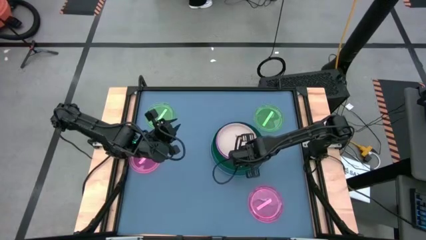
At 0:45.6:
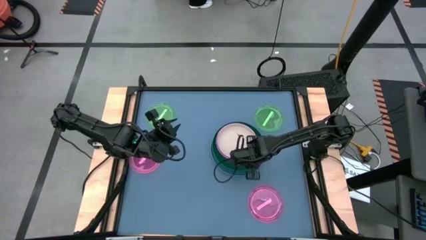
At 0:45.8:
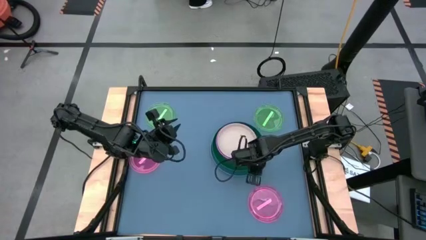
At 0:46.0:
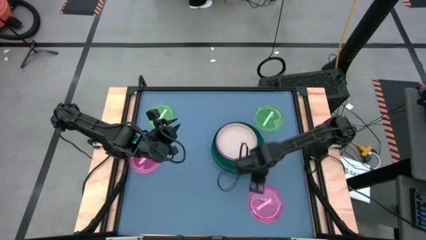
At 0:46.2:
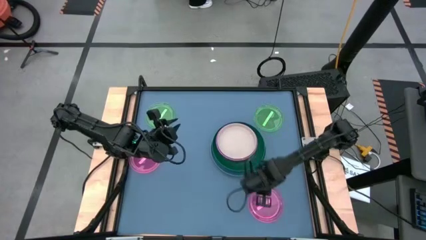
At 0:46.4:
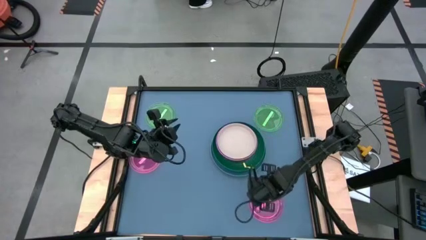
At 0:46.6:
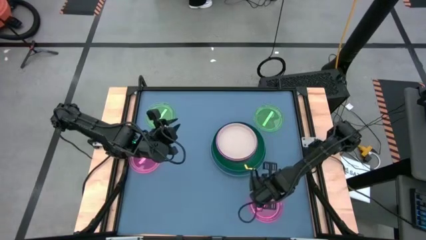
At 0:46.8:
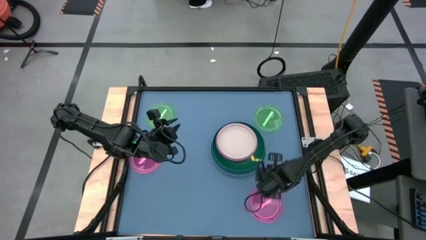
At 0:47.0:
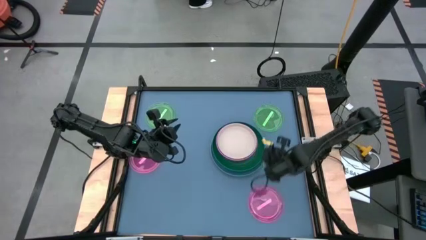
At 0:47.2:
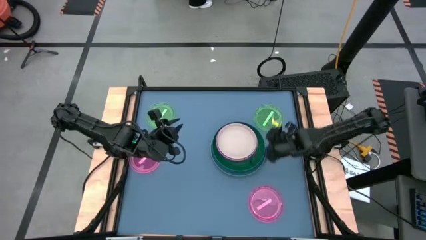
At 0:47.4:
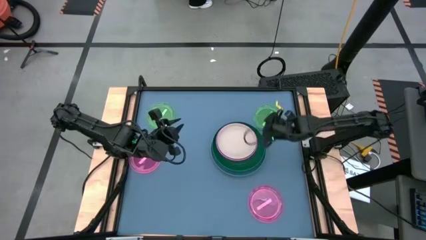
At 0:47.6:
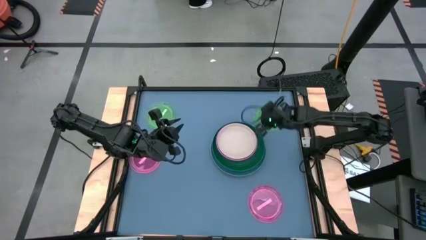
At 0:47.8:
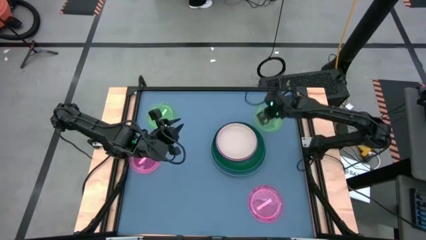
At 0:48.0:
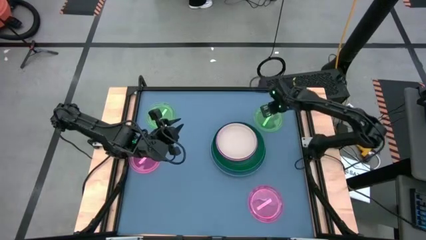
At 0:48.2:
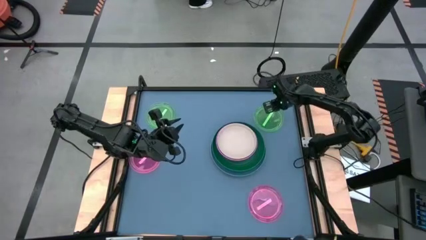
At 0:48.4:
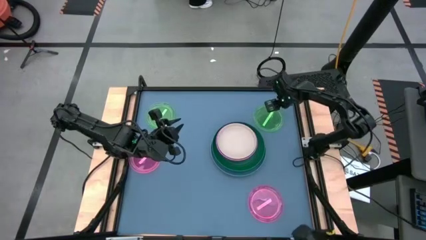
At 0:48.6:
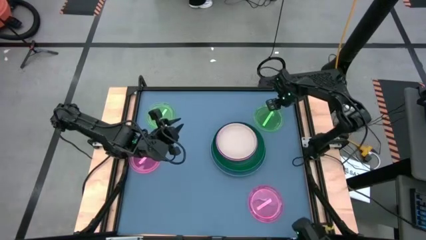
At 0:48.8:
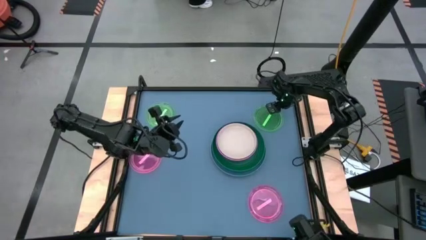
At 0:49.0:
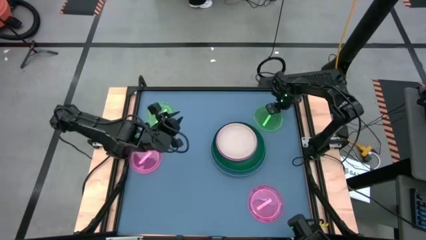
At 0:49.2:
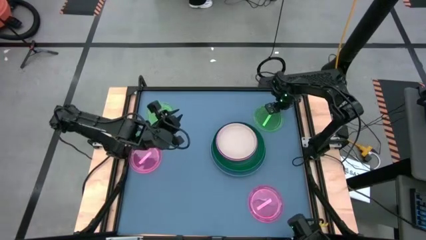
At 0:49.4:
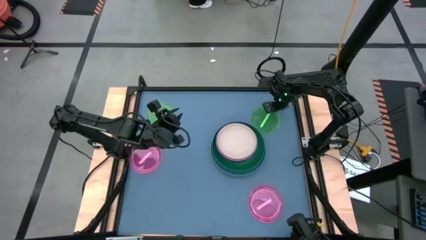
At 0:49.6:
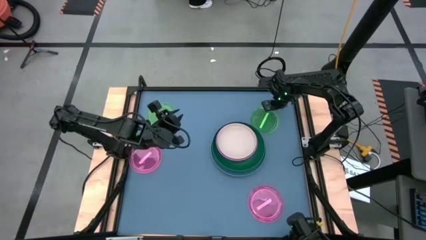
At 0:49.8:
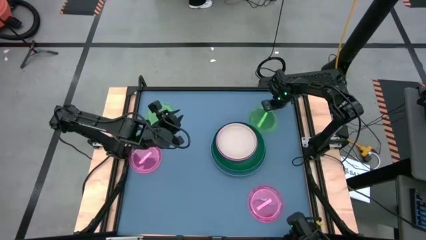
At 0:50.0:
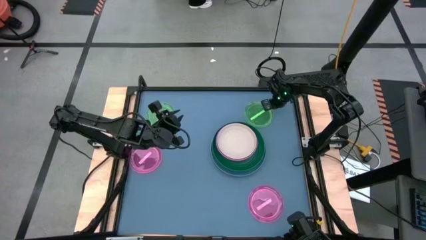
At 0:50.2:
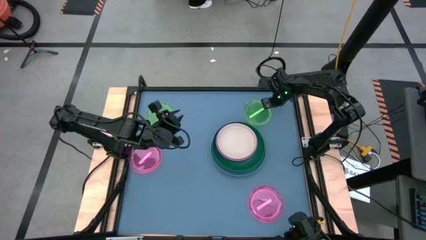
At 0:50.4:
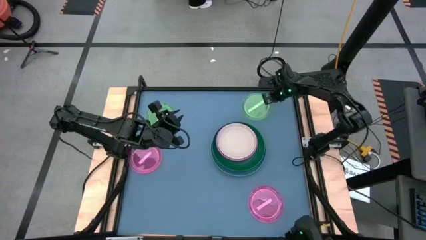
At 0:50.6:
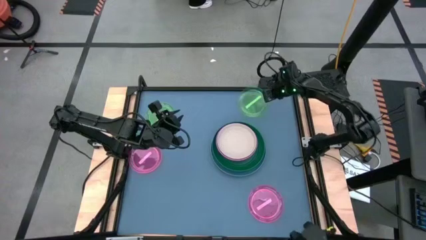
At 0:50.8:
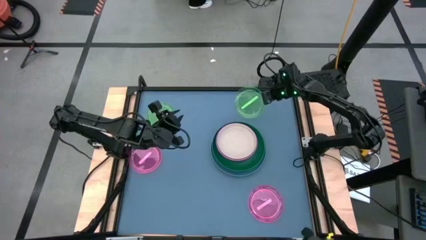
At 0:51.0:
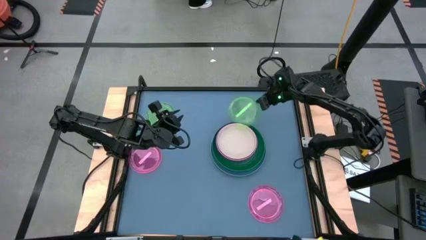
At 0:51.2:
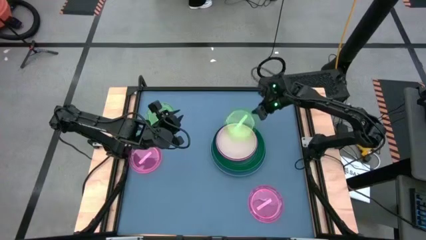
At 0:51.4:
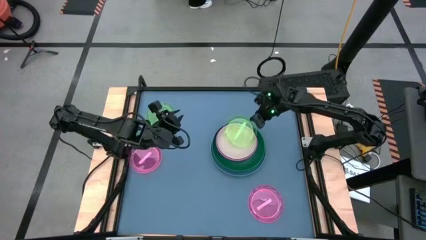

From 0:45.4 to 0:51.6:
Task: Stack plastic plates
Stack the right light green plate on top of the white plate

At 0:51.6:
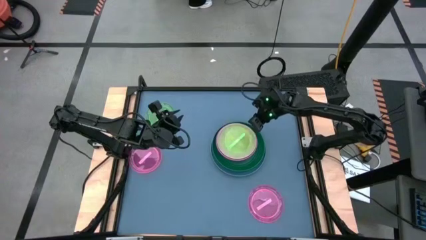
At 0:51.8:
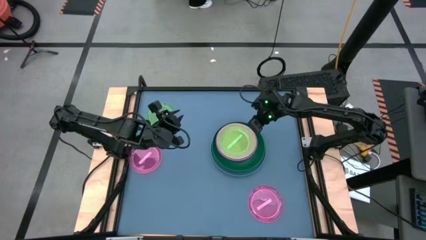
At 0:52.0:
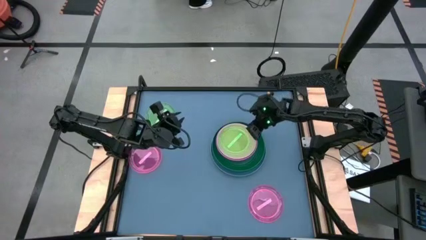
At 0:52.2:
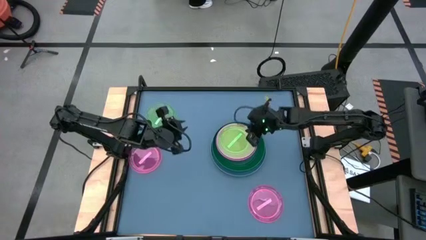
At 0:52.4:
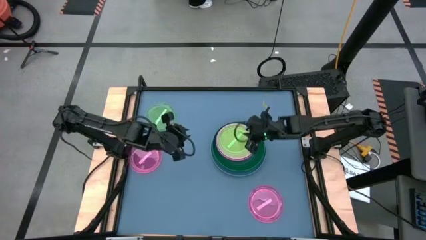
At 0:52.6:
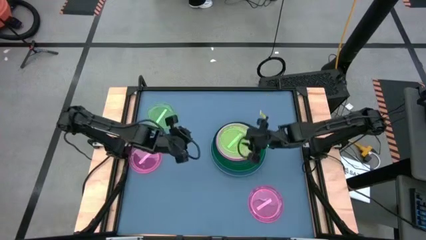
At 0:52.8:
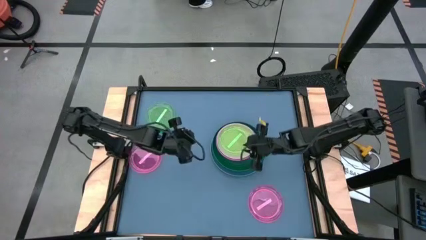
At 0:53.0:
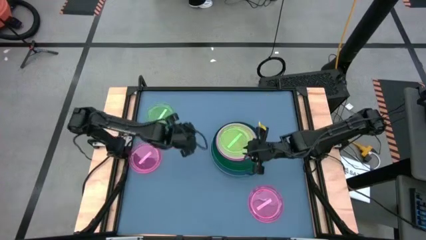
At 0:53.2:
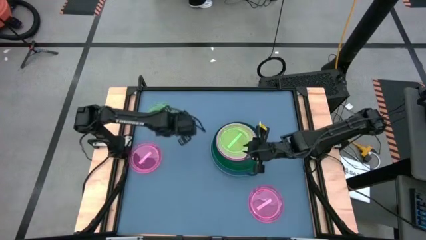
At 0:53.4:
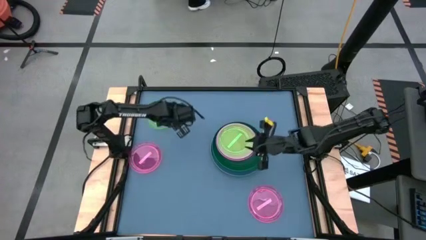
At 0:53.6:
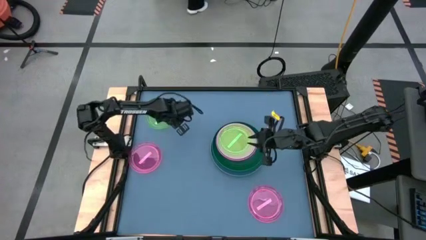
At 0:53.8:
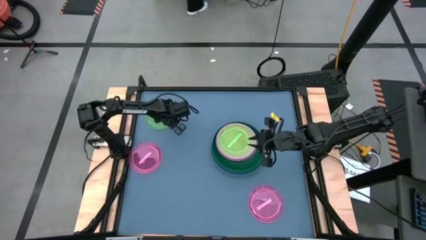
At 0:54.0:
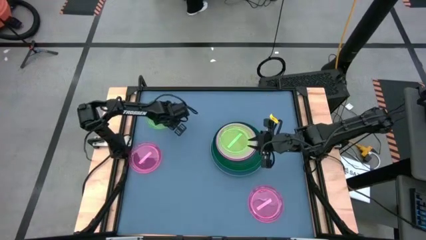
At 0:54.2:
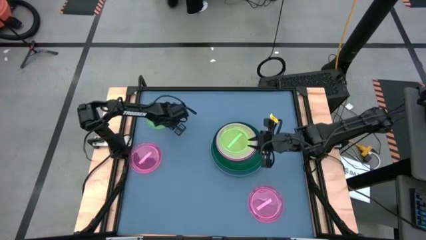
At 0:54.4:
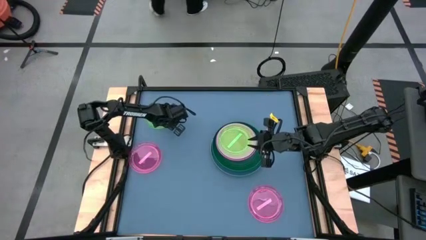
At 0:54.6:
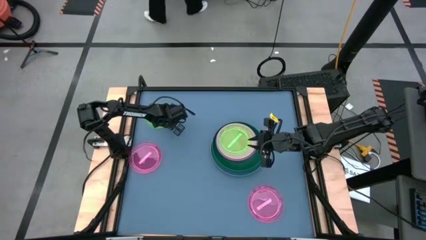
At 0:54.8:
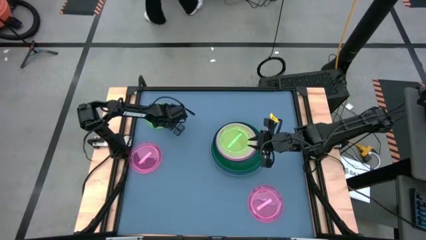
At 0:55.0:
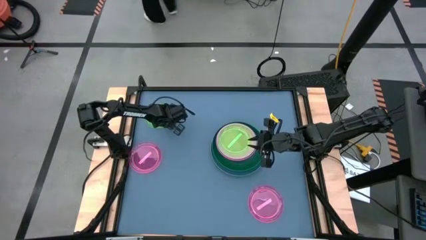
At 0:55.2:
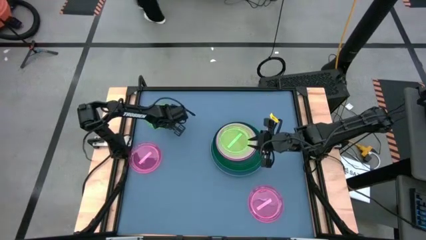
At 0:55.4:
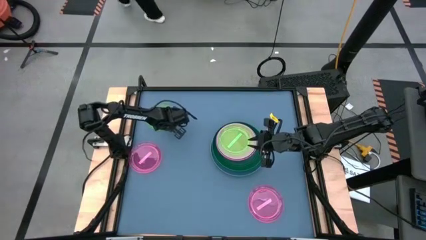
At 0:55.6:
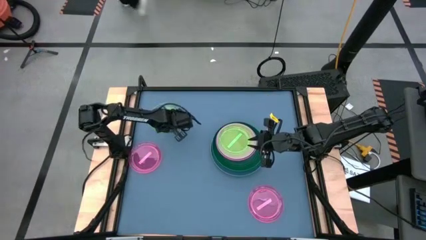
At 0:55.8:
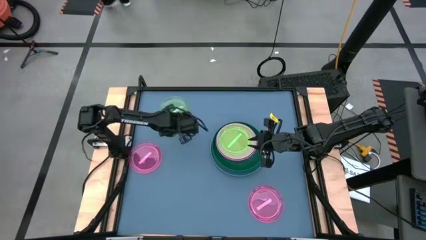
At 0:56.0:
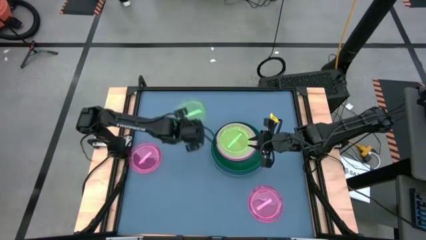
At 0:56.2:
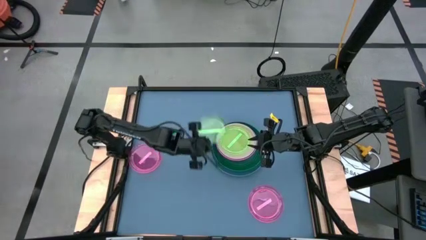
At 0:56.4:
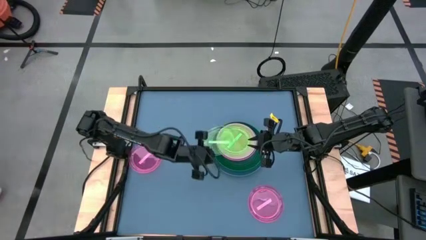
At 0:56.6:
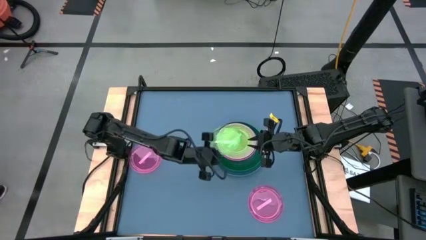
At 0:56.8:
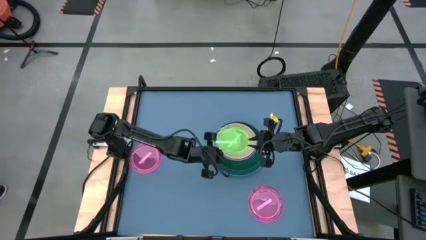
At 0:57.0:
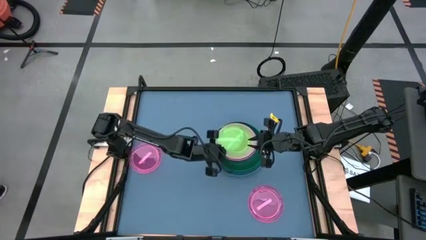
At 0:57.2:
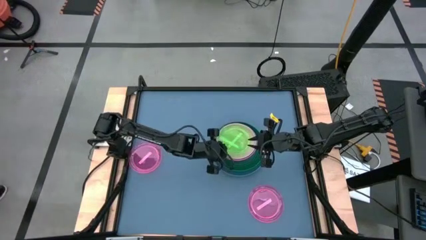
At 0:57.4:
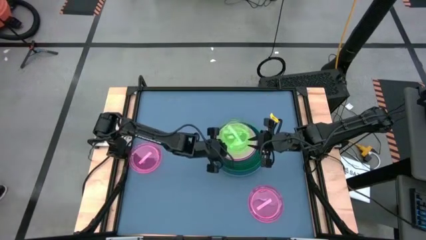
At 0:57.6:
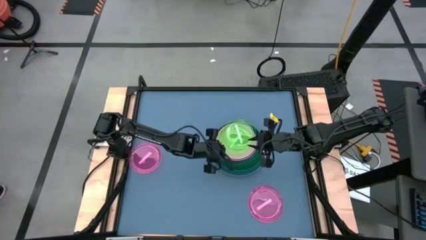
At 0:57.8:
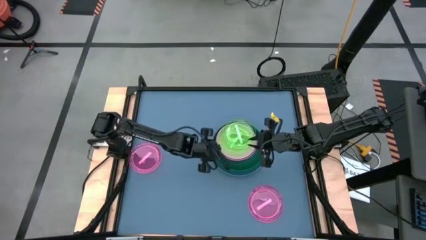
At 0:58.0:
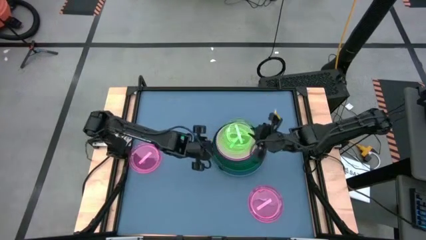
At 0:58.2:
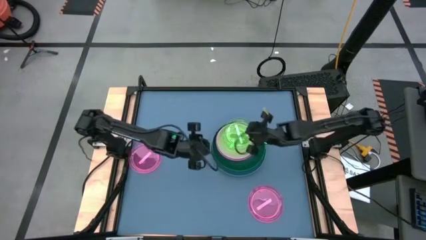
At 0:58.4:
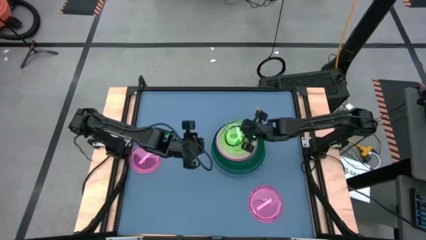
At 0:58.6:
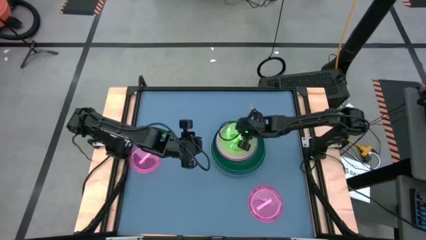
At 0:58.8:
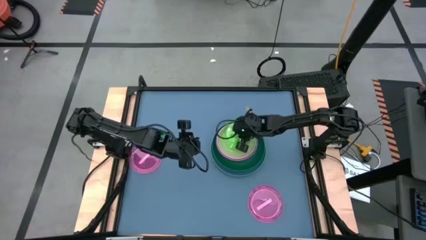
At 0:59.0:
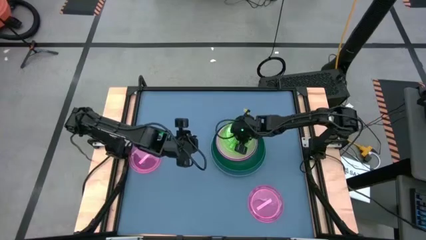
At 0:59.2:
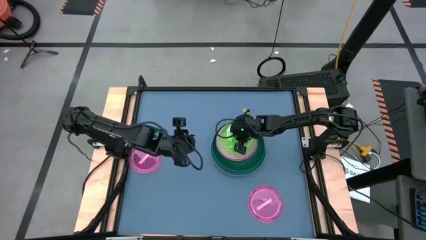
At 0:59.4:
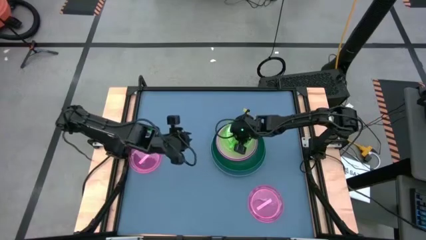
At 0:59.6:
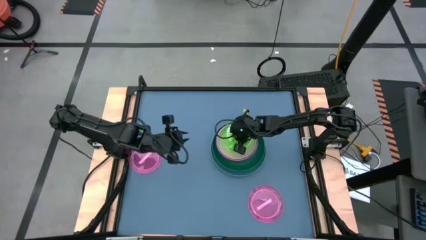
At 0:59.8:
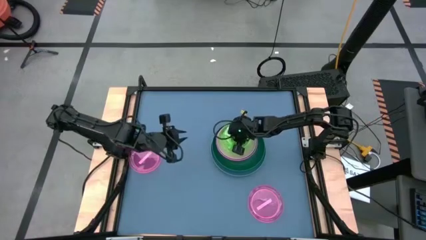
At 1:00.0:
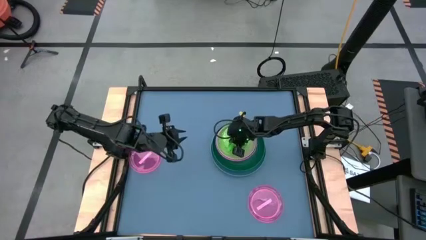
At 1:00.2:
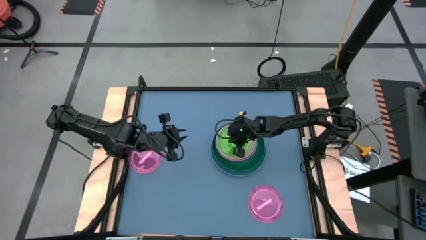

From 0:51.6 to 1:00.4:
Stack the light green plate on top of the light green plate
